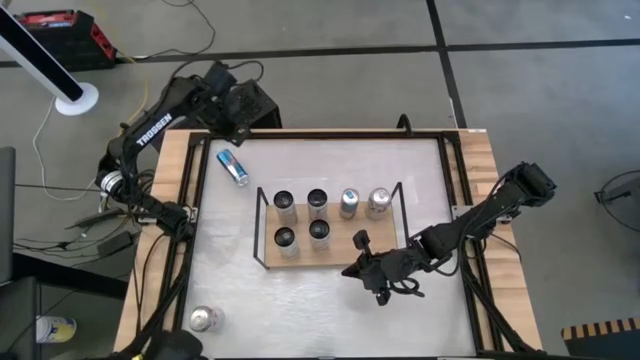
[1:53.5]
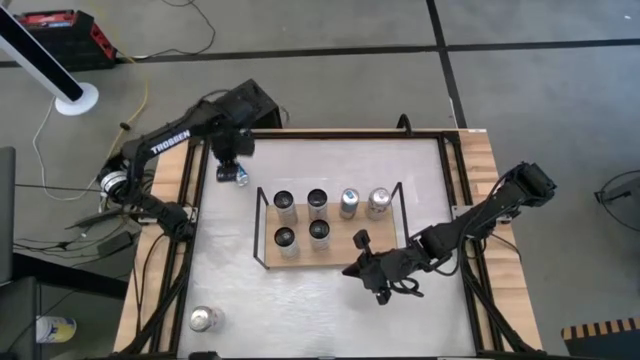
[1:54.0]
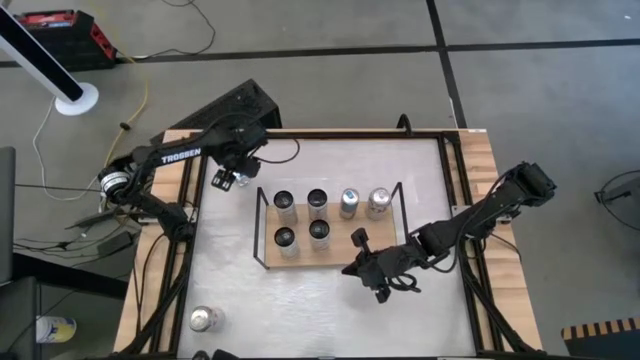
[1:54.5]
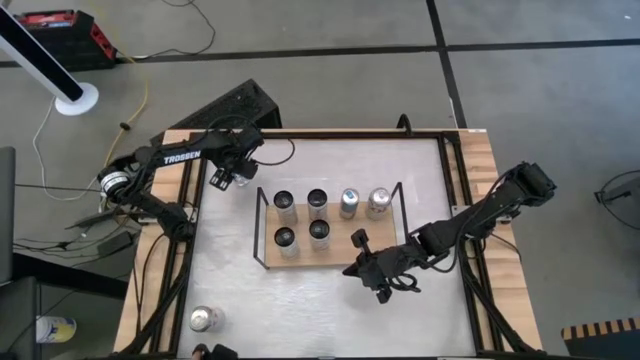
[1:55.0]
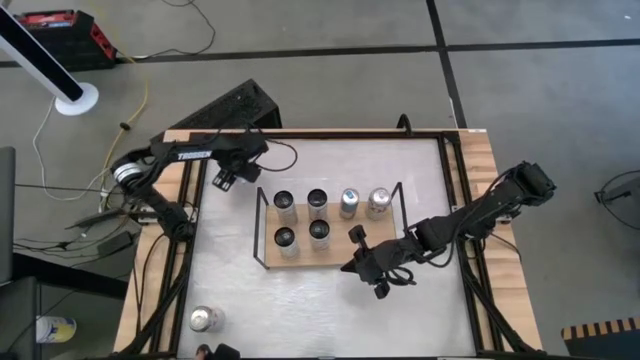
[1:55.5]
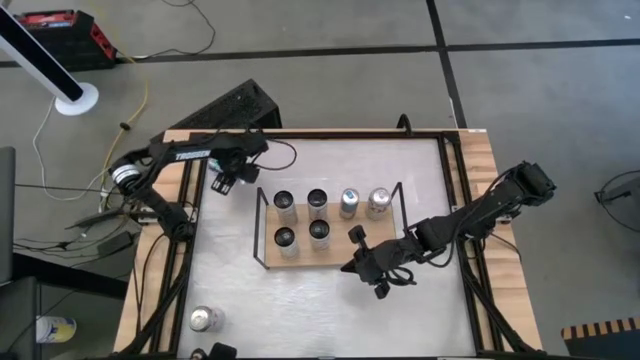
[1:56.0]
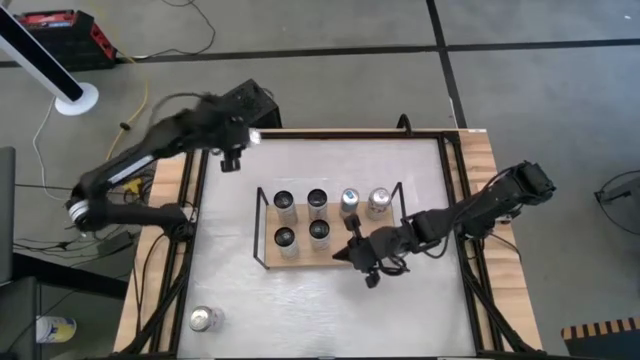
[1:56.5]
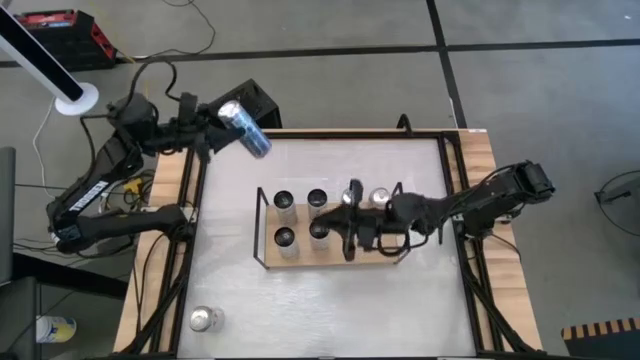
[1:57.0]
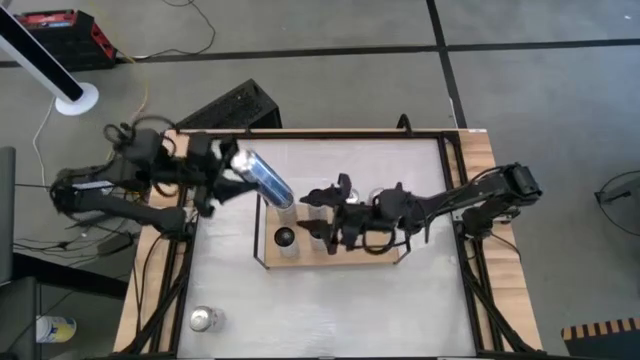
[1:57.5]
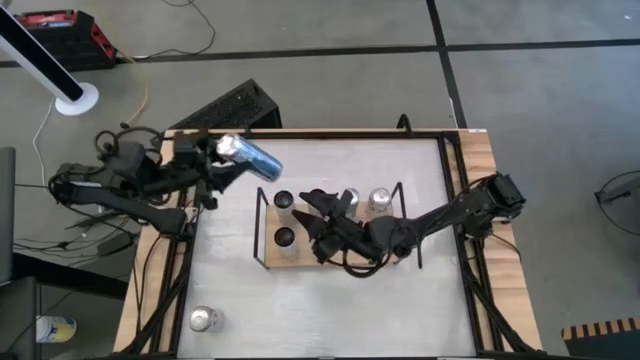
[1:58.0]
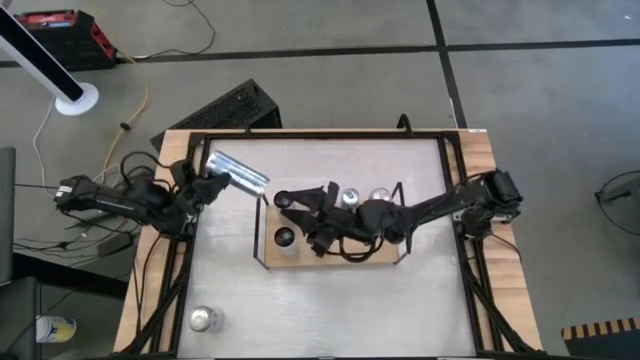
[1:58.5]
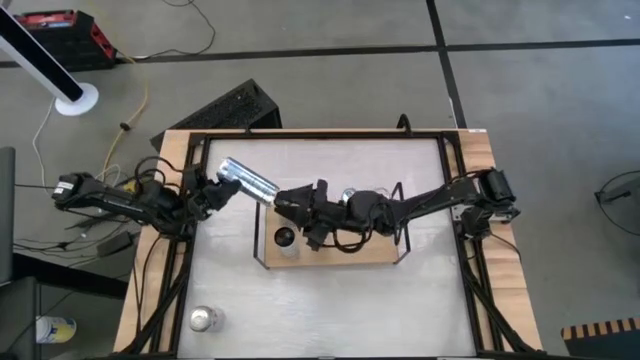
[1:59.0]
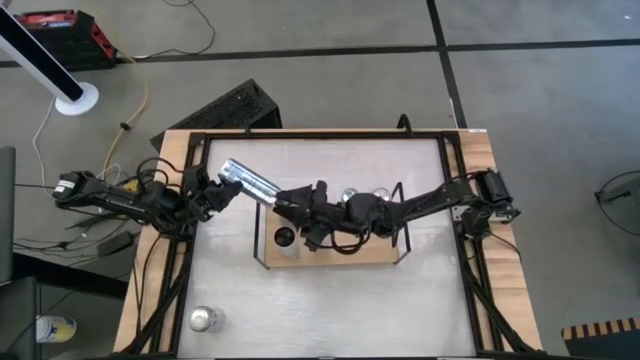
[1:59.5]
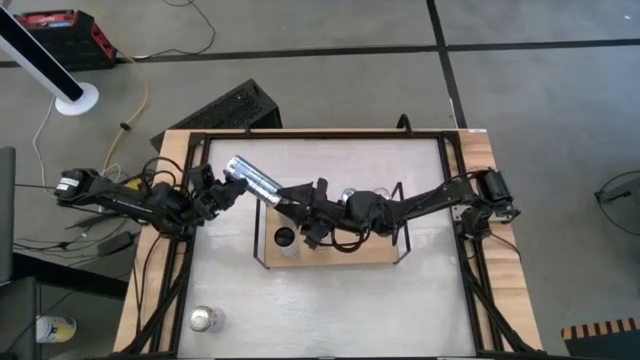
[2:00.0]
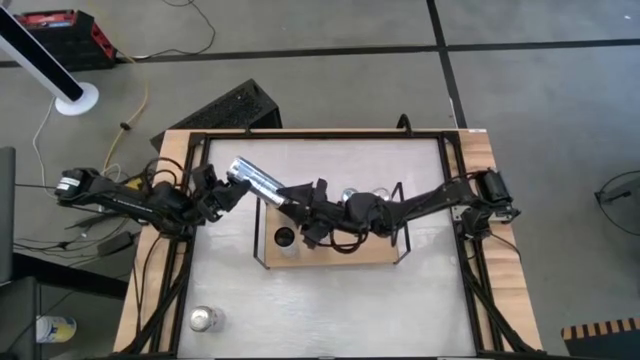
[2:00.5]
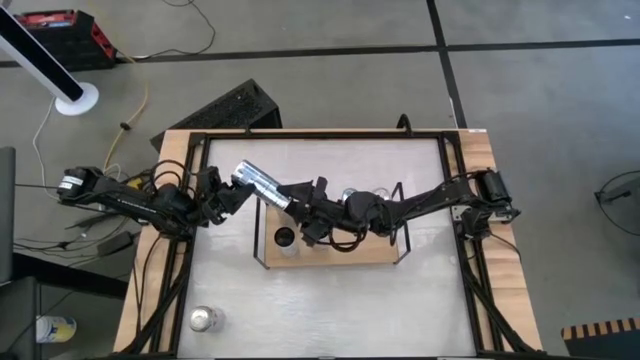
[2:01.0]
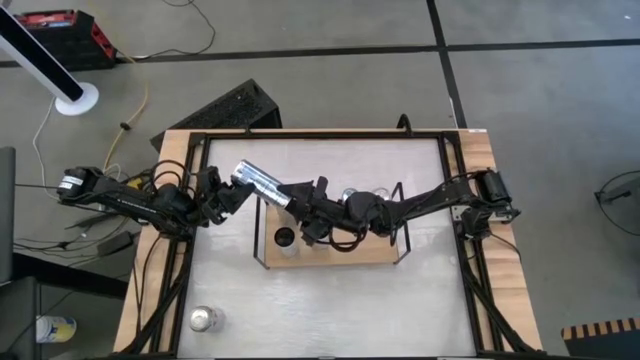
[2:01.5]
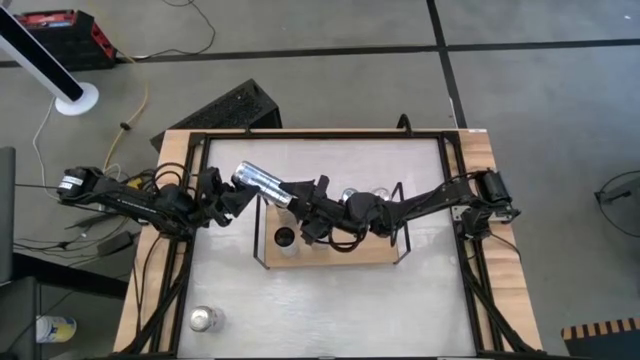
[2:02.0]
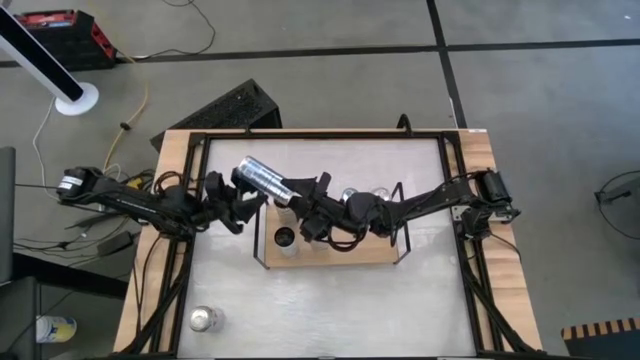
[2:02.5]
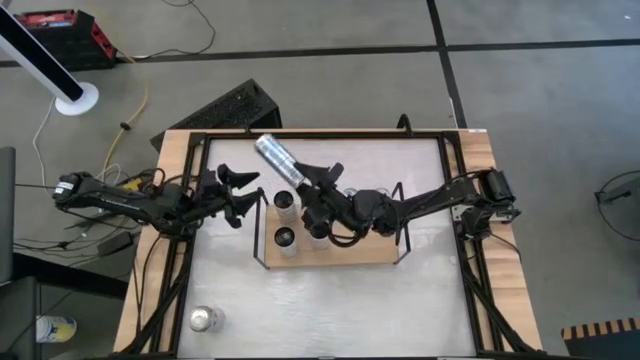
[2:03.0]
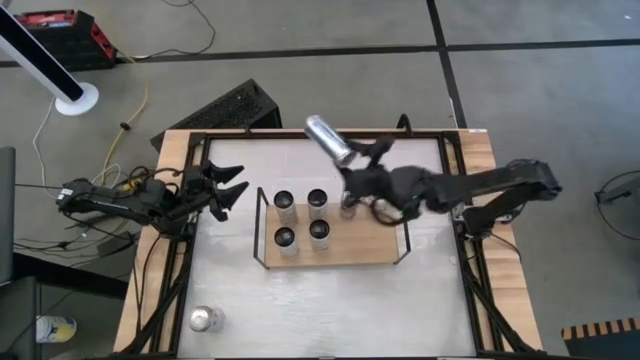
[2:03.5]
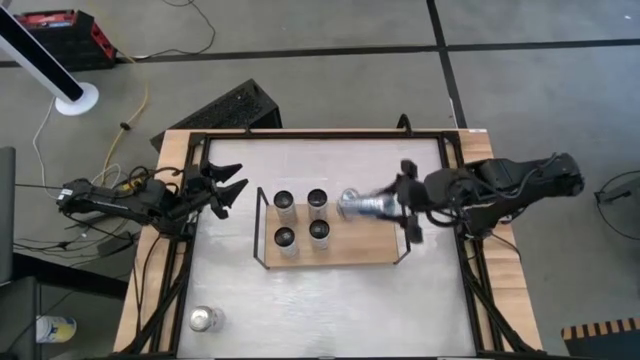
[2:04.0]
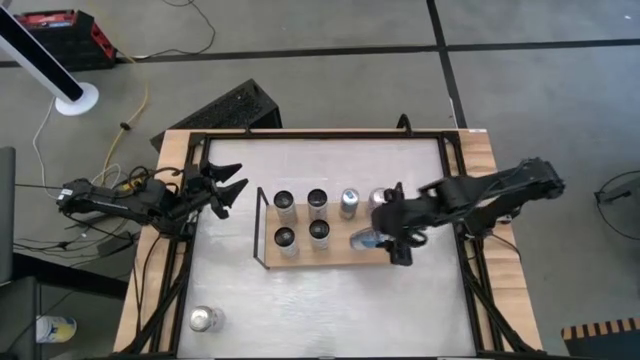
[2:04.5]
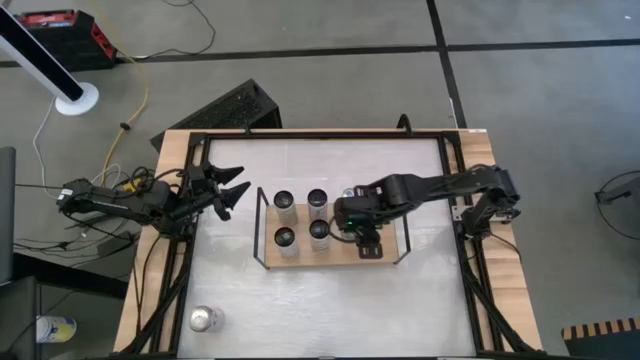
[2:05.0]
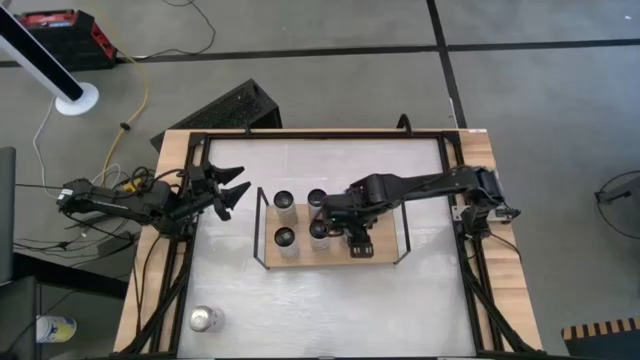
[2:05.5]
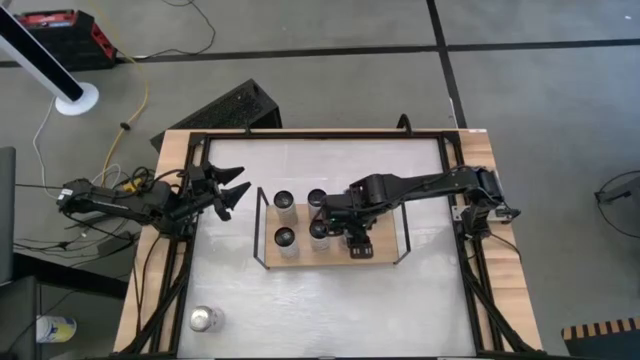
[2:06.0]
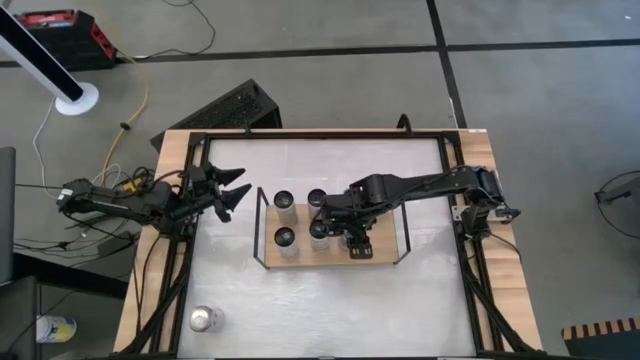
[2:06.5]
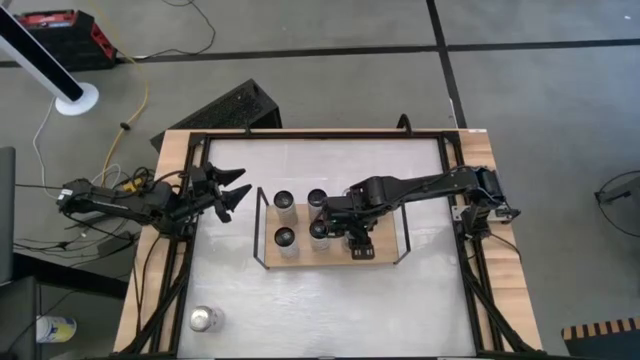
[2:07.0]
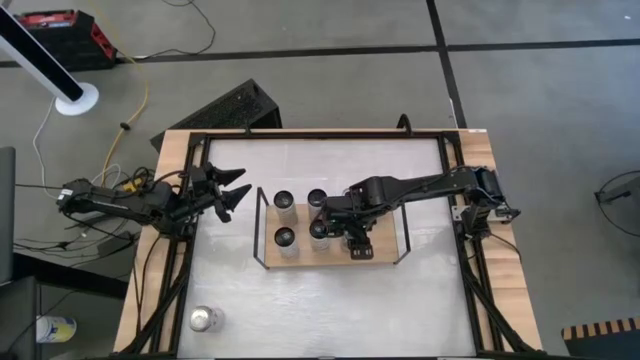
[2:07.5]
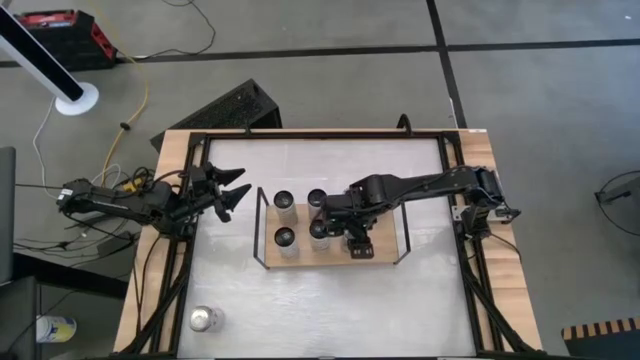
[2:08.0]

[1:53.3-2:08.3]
Task: Place canned beverage on shelf
Put the blue soda can on the shelf aligned with the other blue soda can

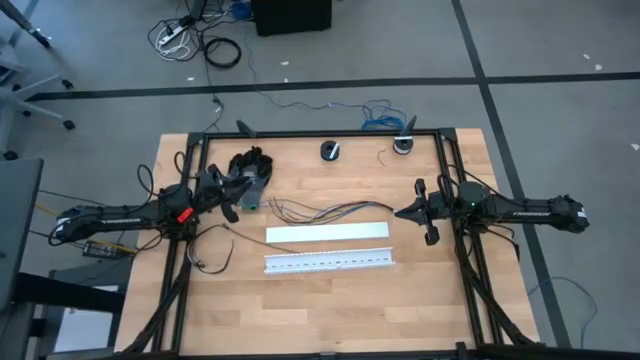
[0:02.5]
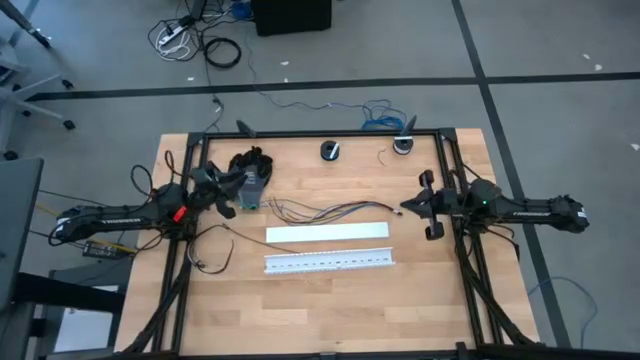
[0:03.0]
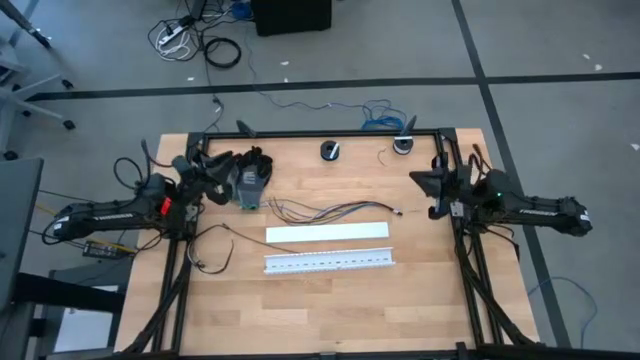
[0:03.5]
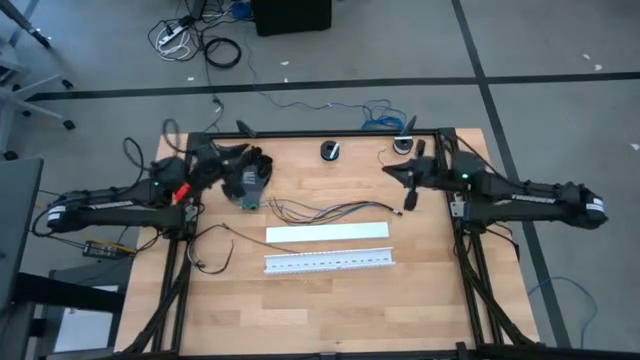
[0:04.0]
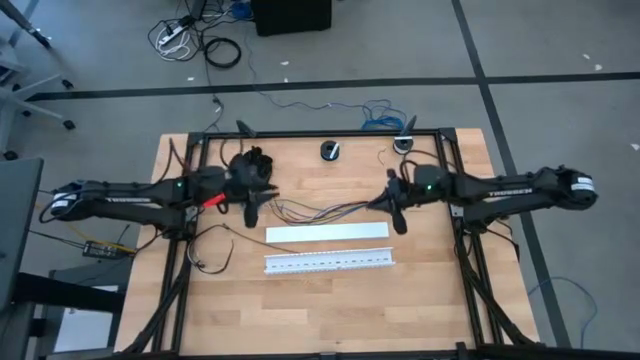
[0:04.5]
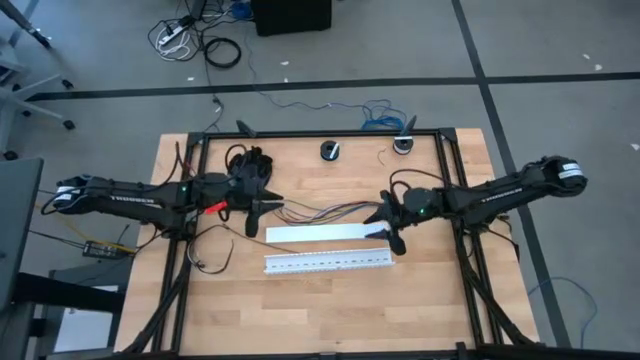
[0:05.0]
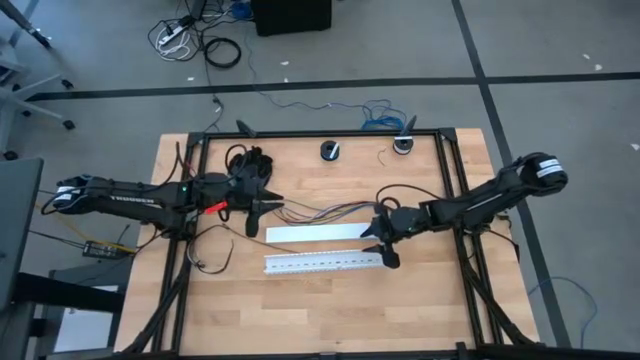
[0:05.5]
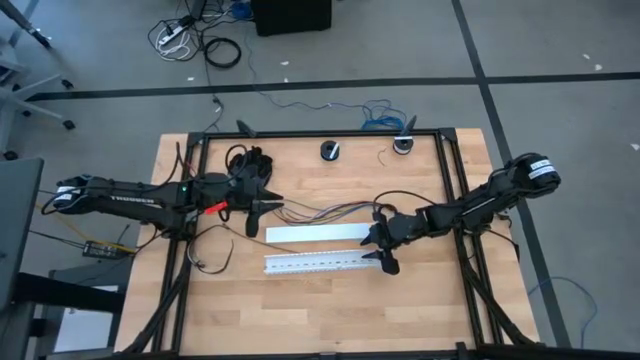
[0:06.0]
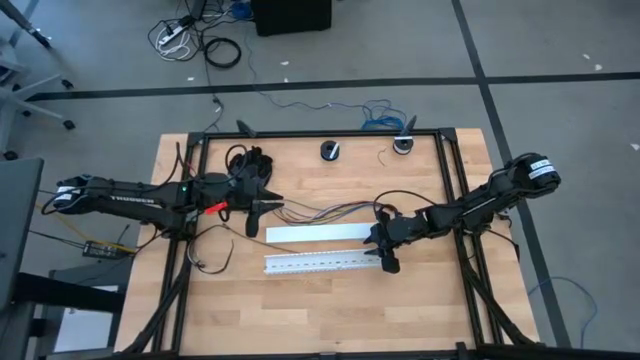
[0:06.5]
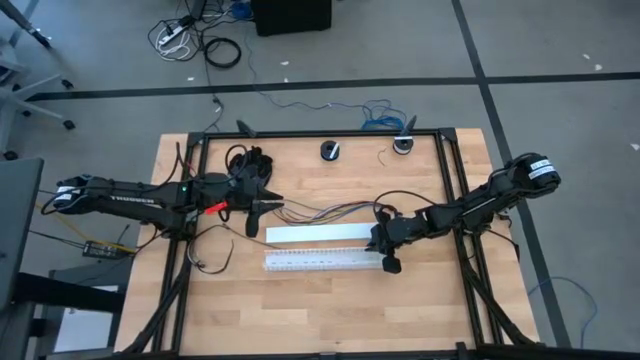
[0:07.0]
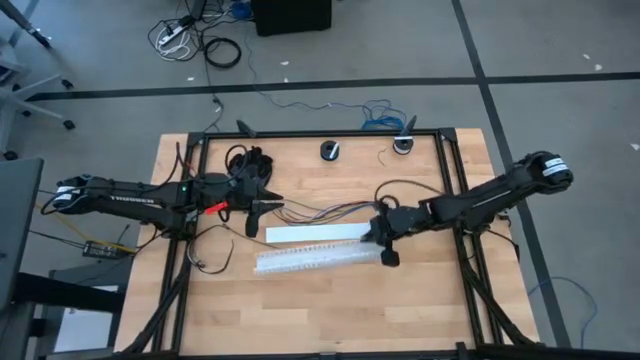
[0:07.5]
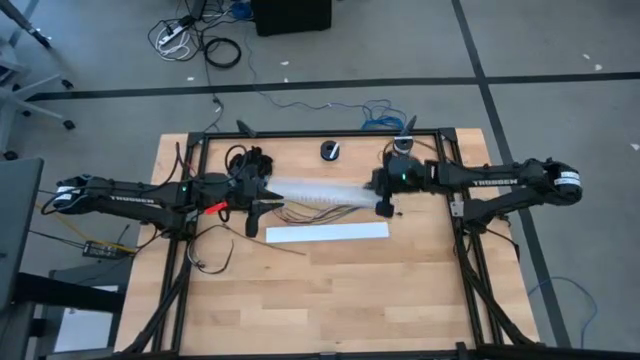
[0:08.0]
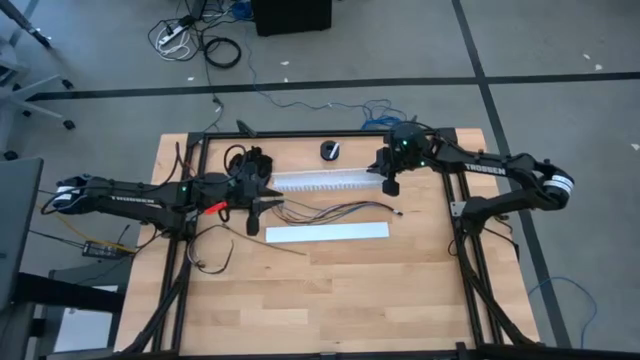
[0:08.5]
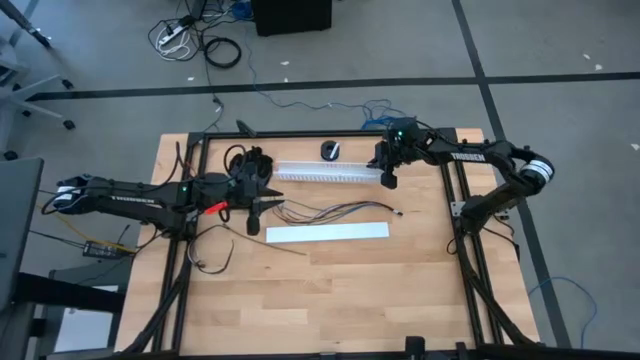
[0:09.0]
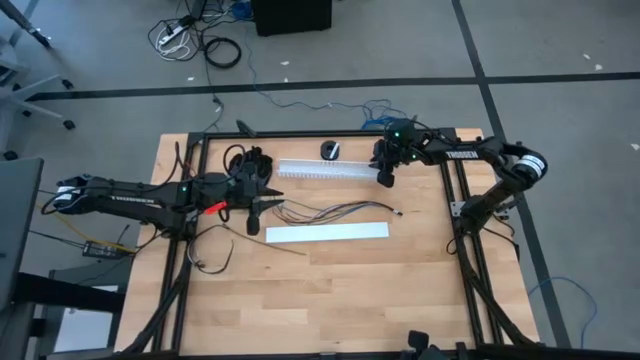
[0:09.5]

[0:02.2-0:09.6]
Task: Ziptie cables
Move the white cable duct to the top center of the table
